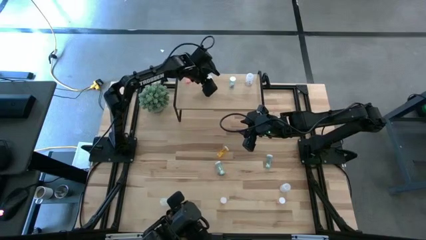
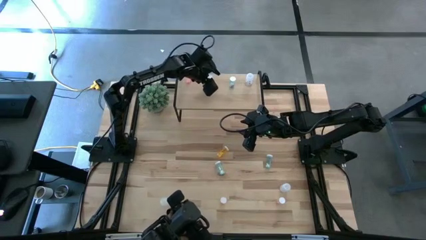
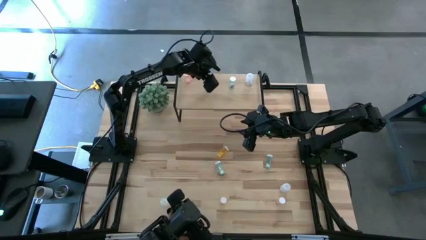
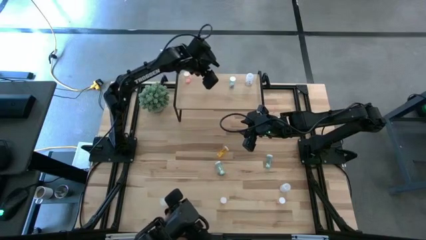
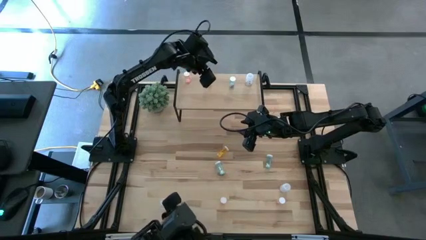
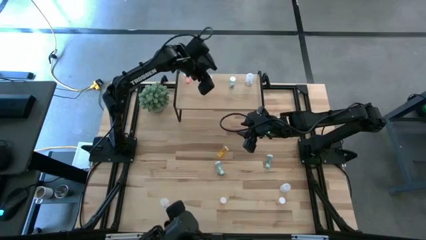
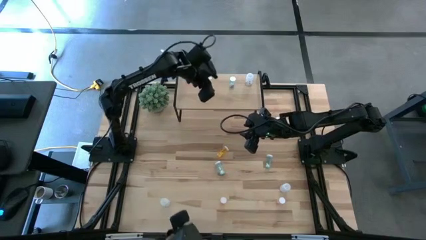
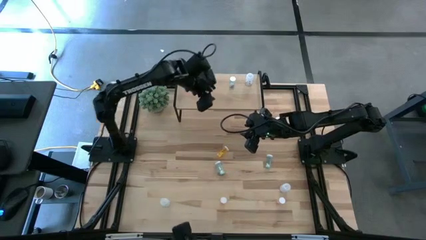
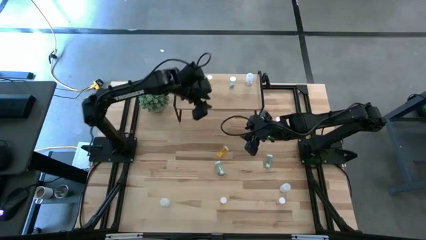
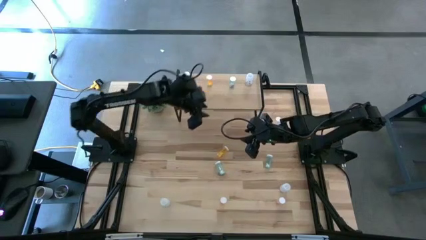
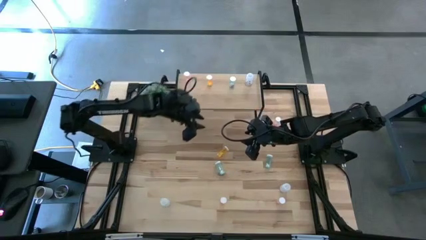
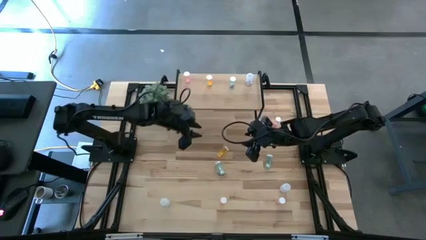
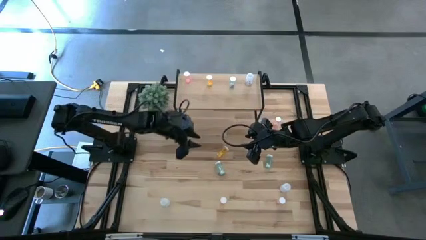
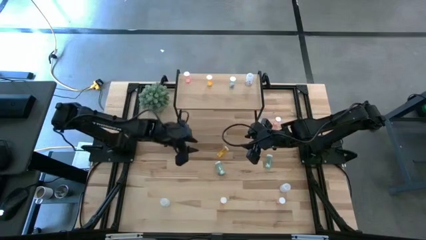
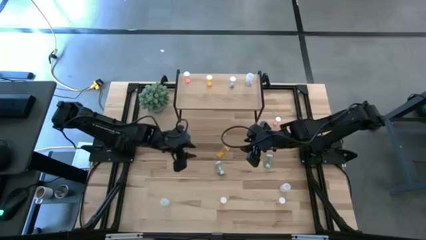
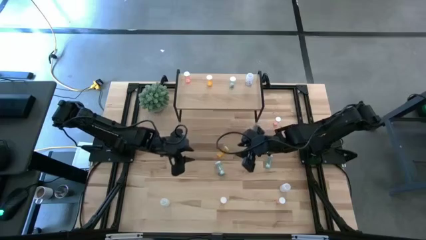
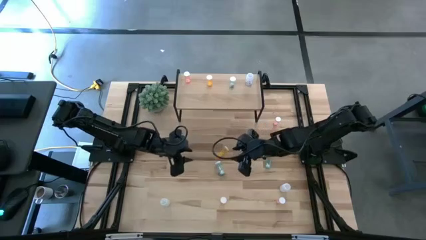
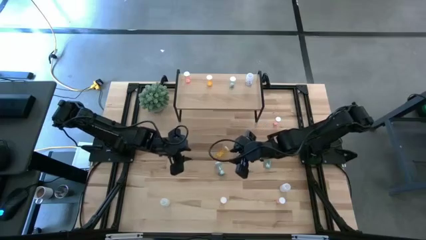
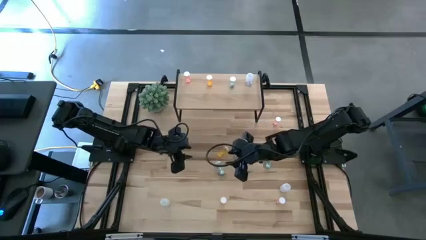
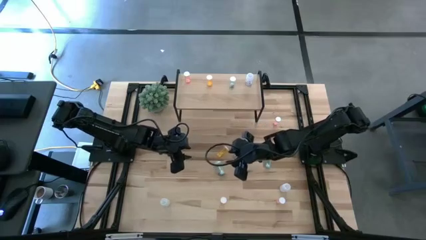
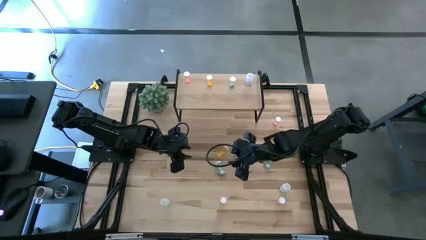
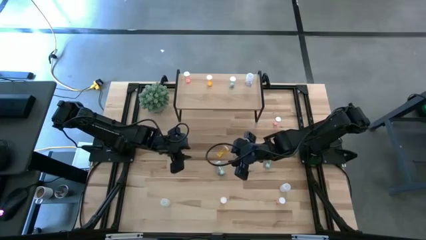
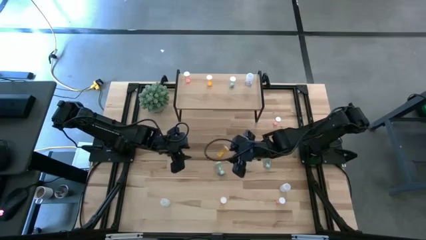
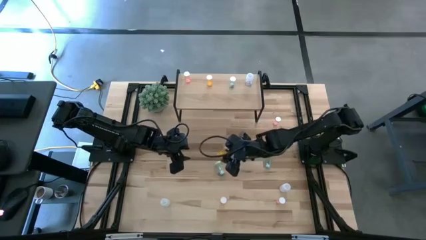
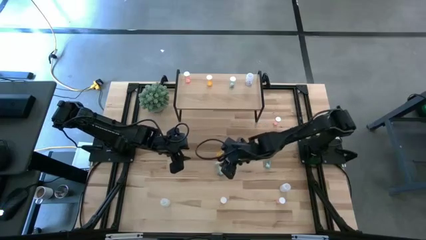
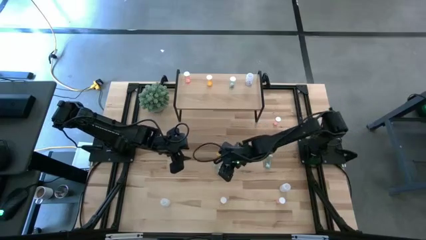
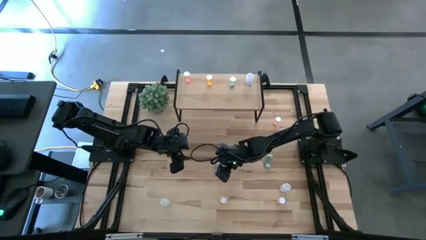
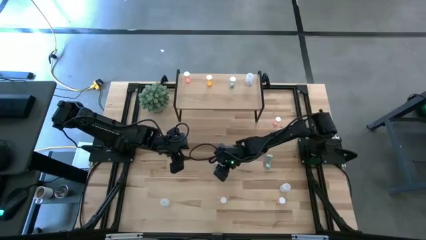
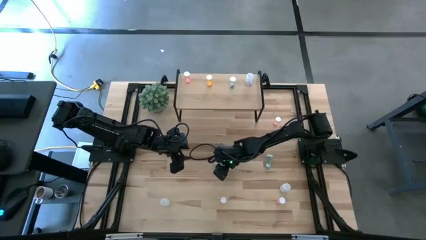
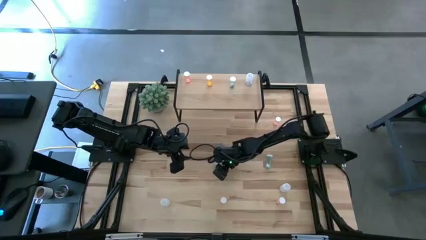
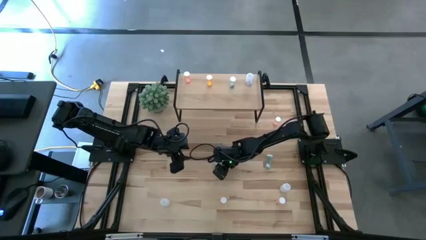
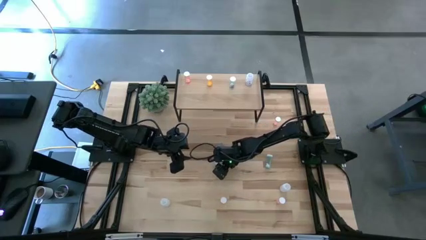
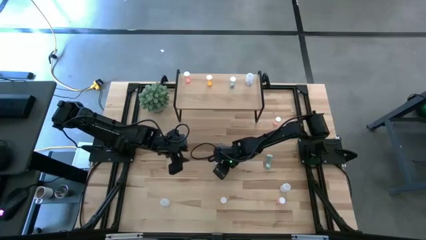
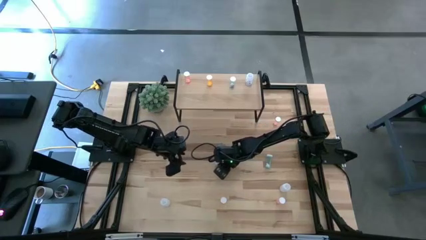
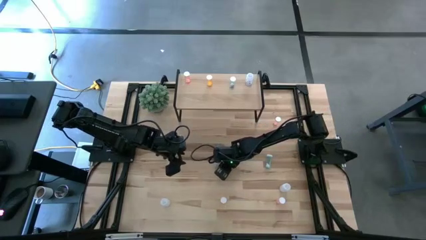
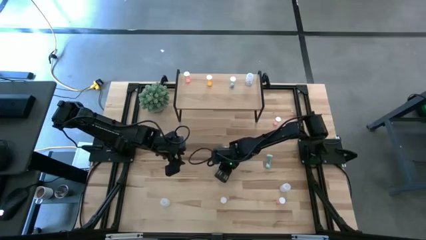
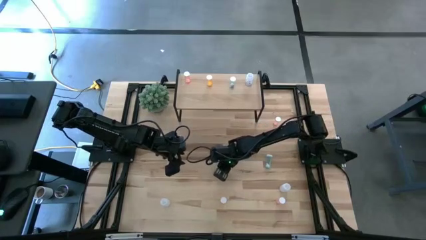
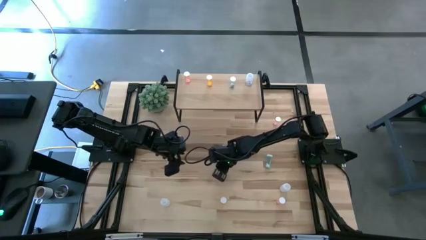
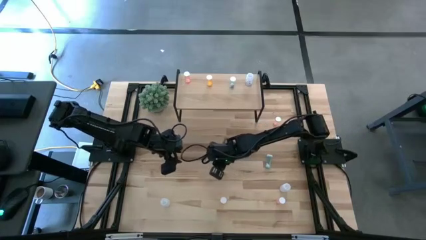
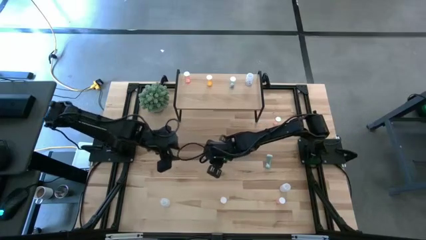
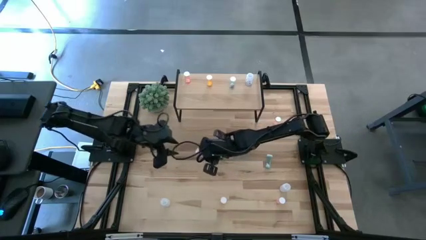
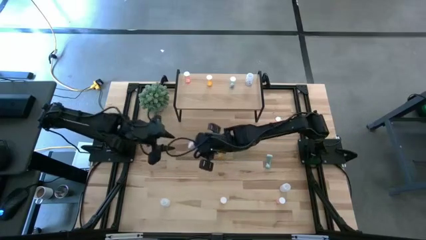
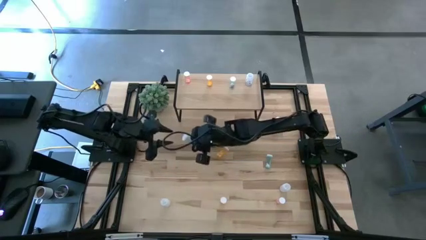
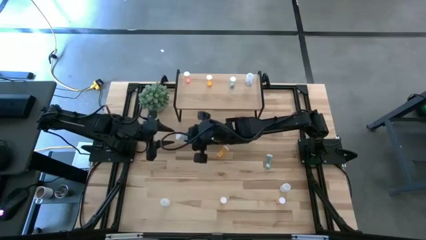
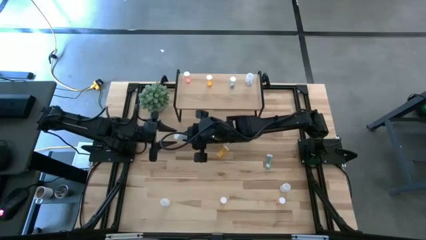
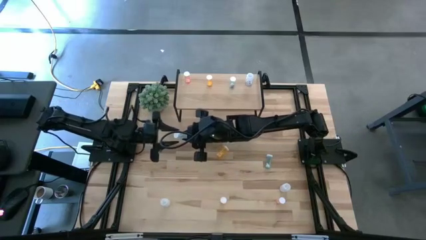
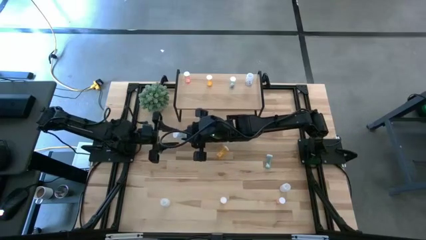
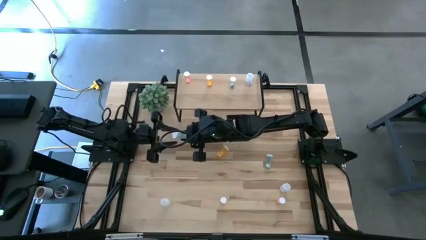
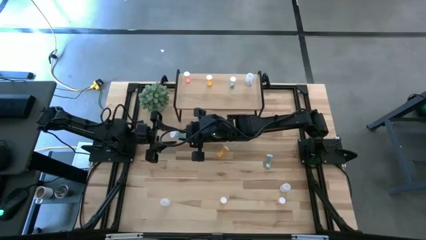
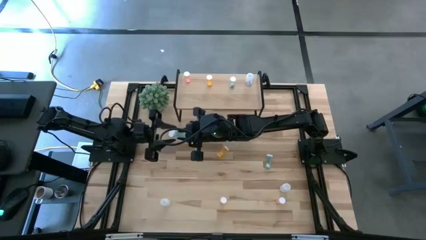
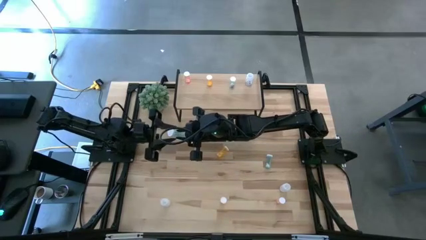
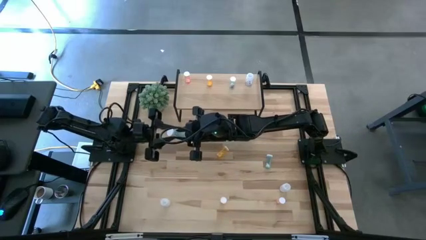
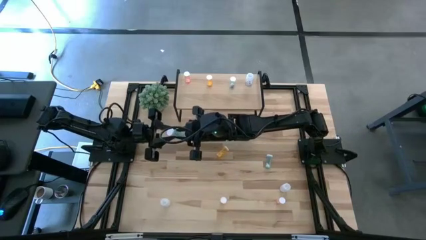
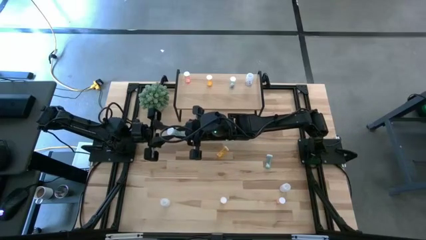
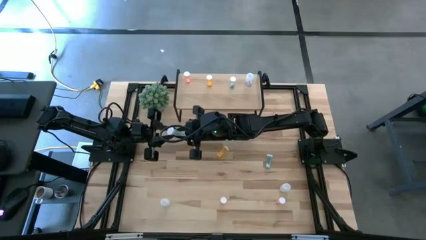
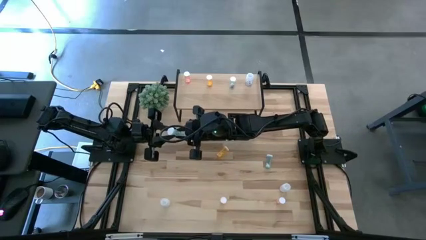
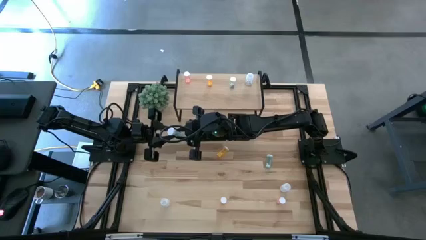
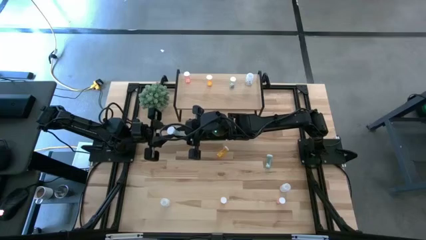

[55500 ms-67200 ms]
Task: Pick and place medicine bottles onto shelf by color
Put the left blue pill bottle on the shelf aligned with the other blue pill bottle

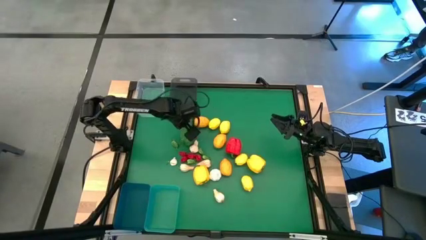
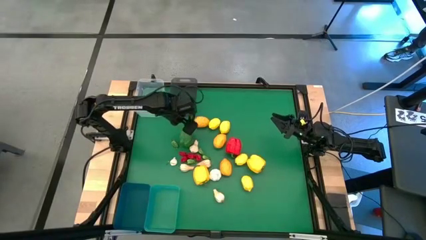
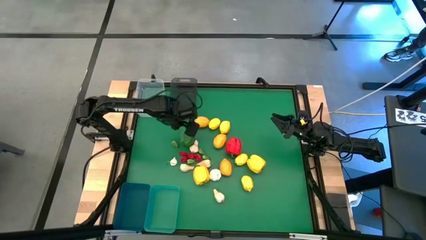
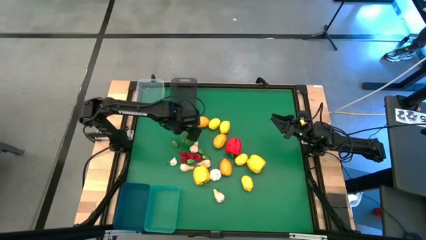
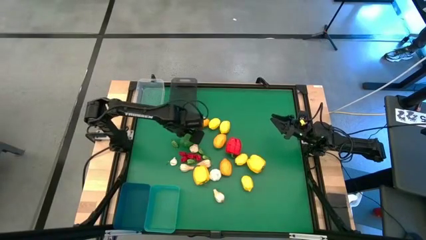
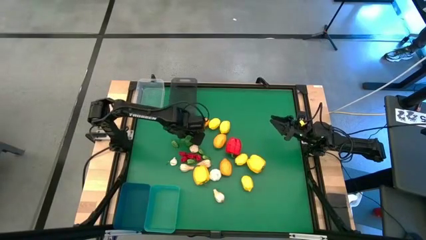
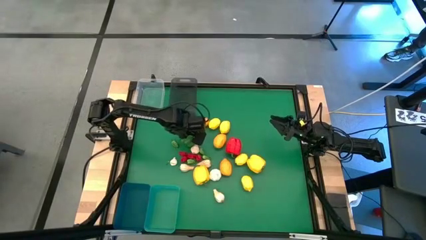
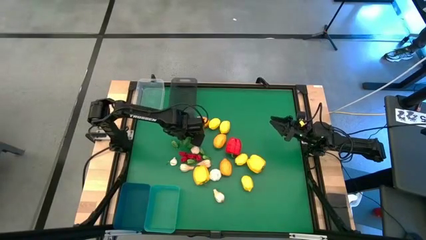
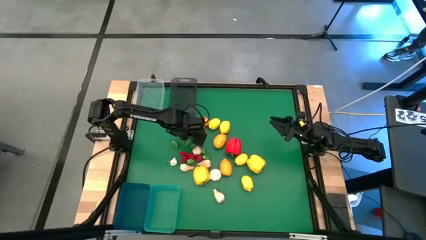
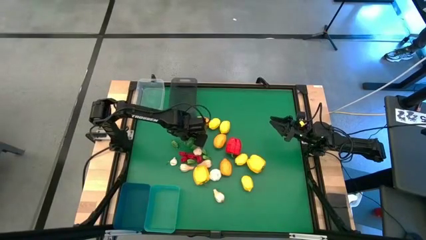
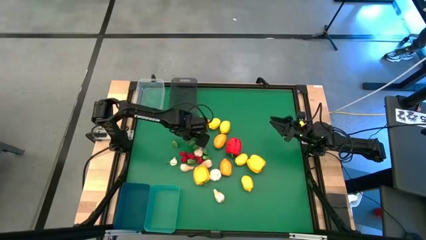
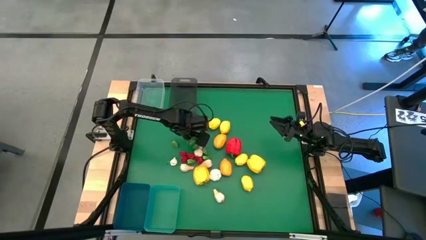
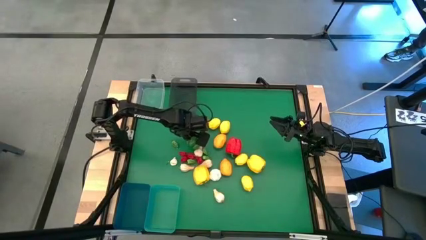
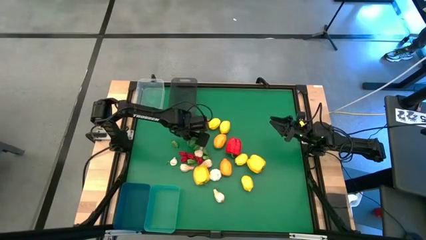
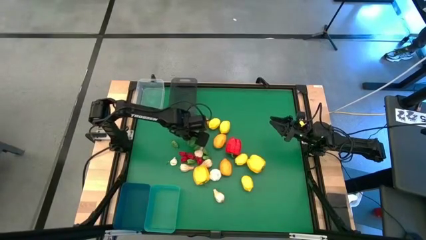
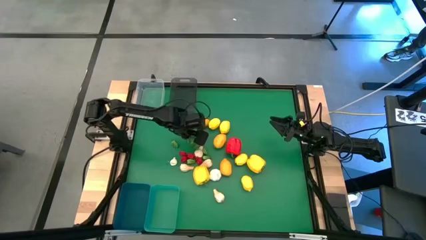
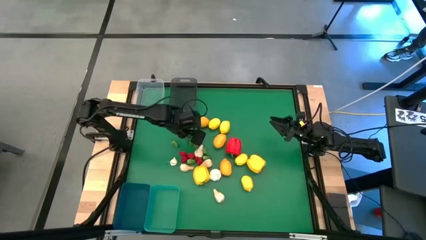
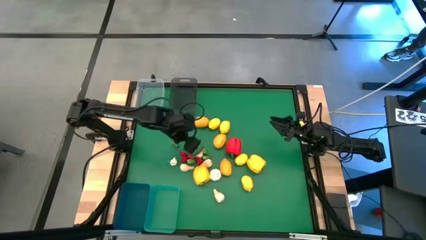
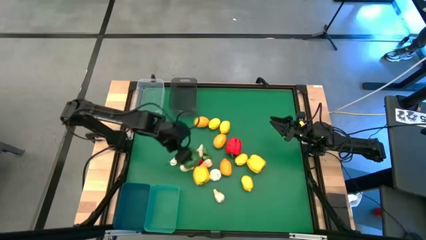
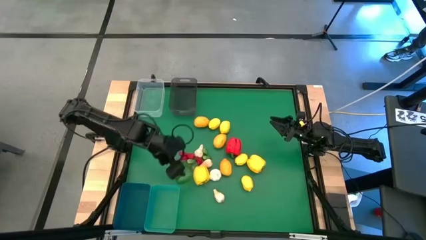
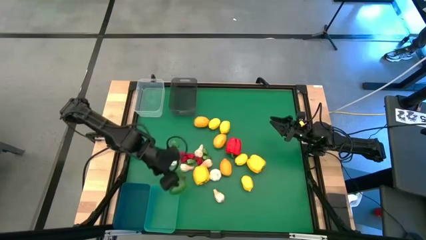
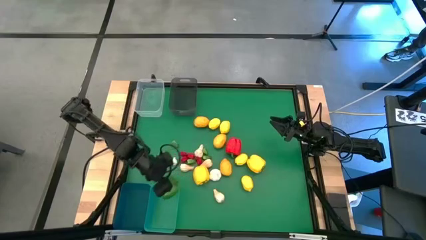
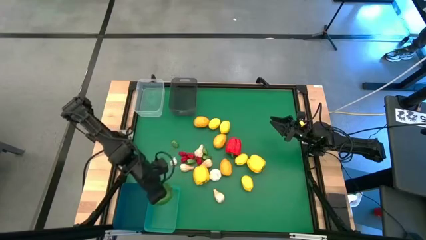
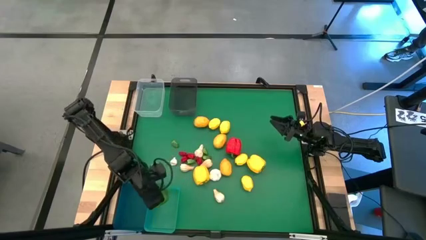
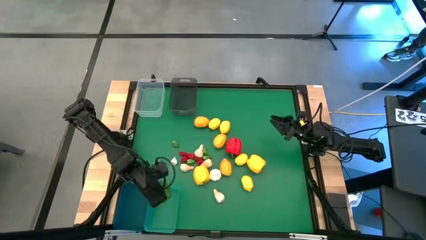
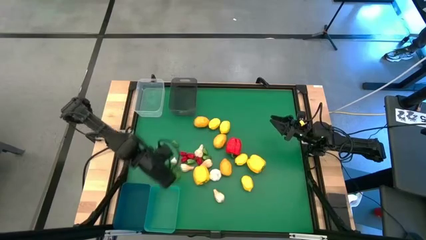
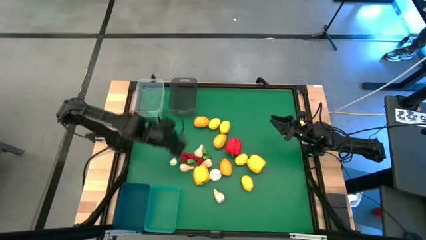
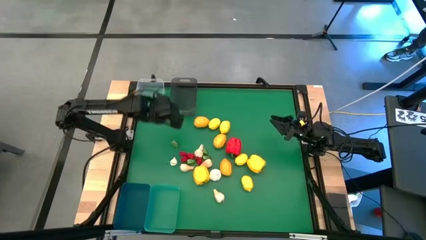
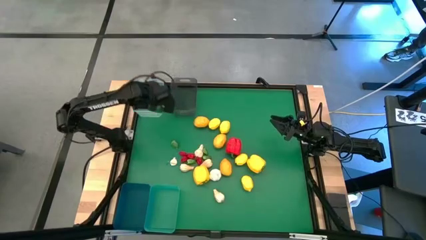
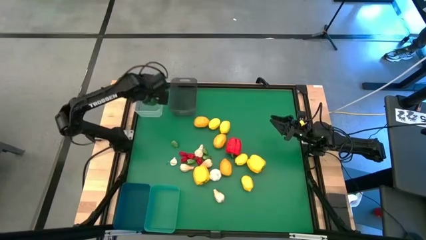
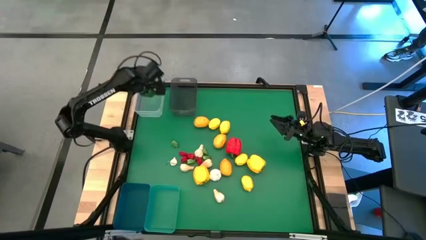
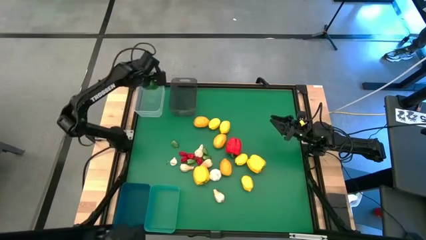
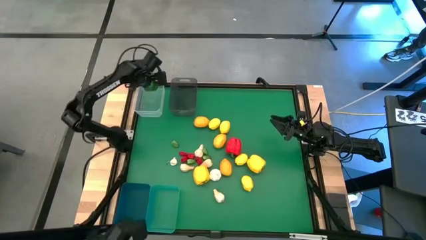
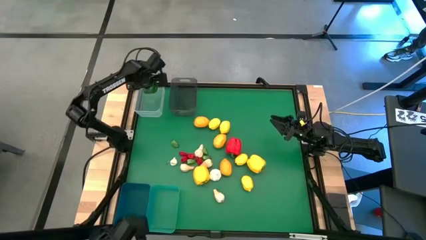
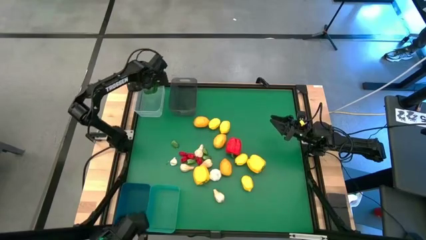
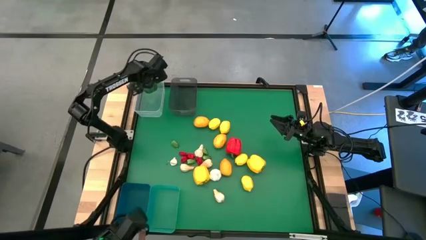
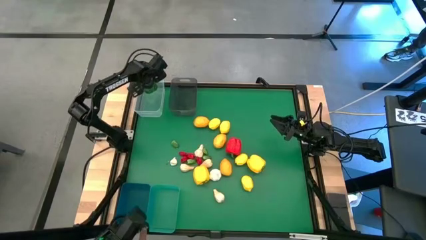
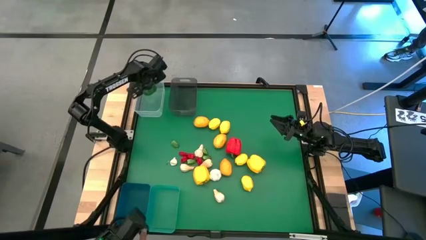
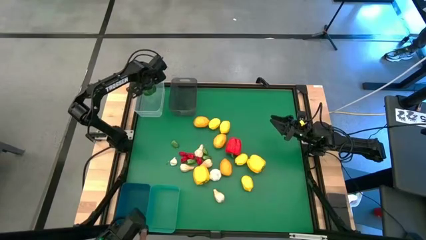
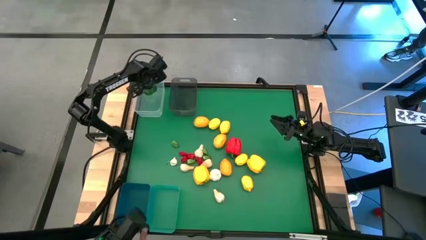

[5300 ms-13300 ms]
Task: Sort produce into baskets
Put the green bell pepper into the transparent bin
